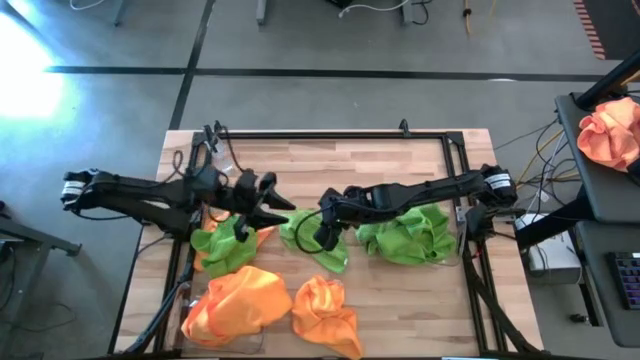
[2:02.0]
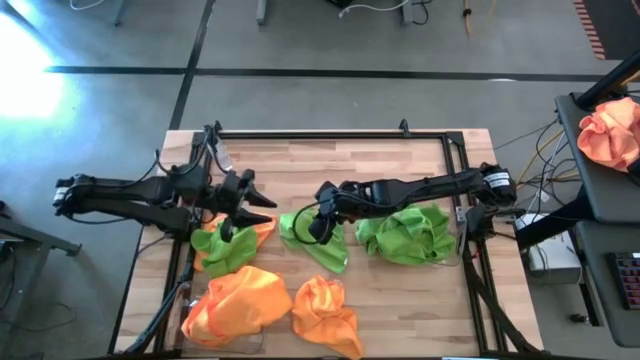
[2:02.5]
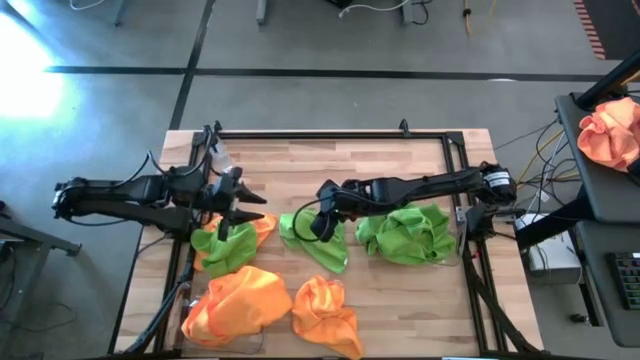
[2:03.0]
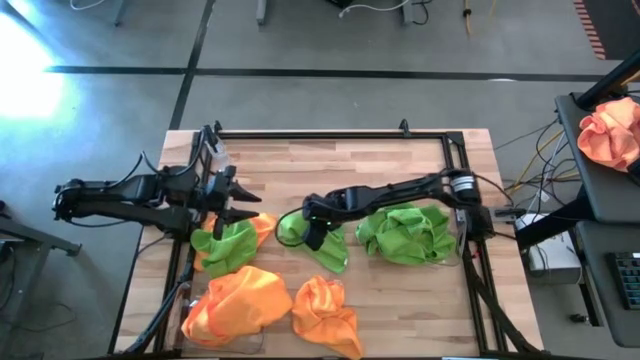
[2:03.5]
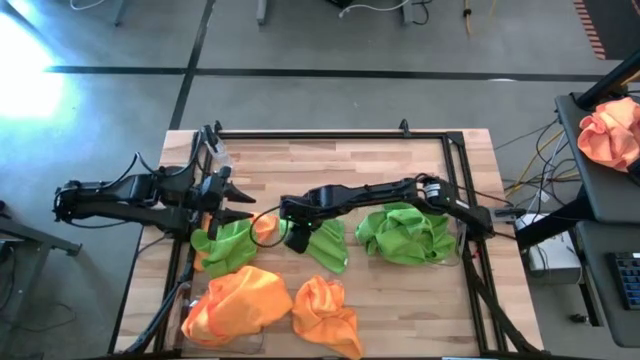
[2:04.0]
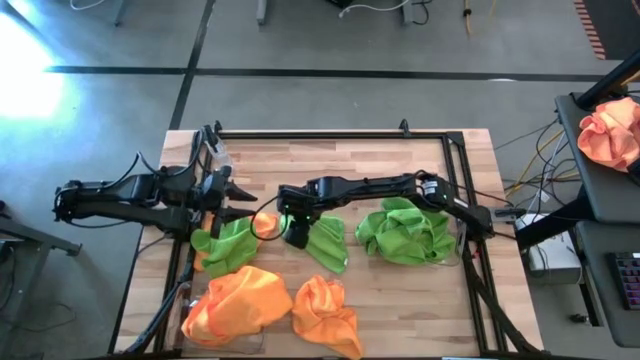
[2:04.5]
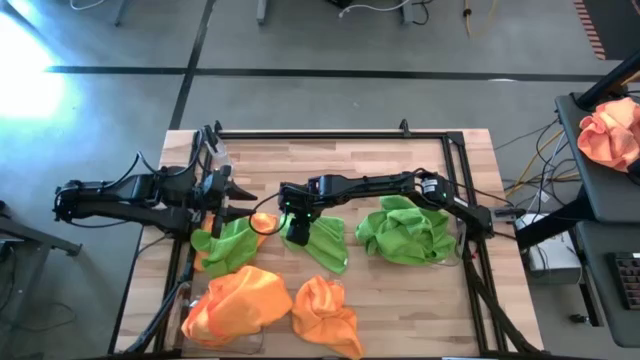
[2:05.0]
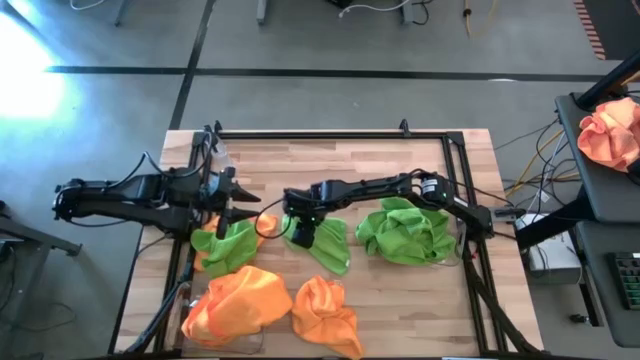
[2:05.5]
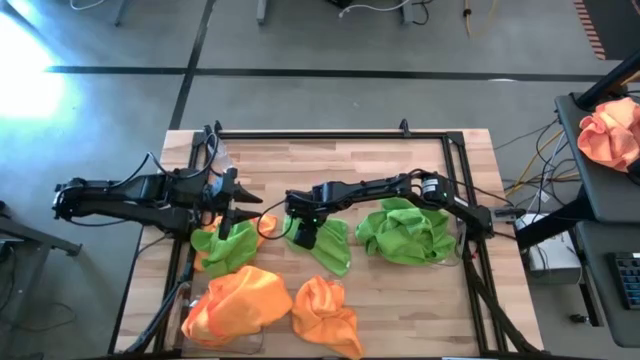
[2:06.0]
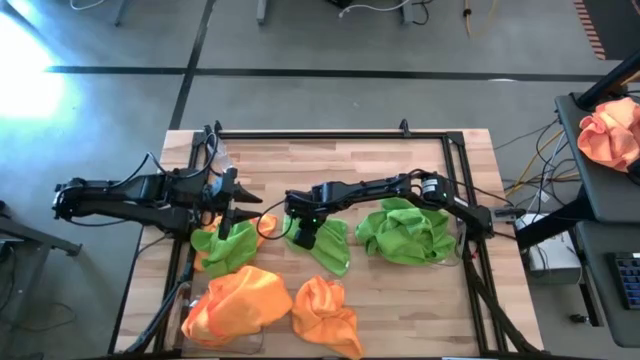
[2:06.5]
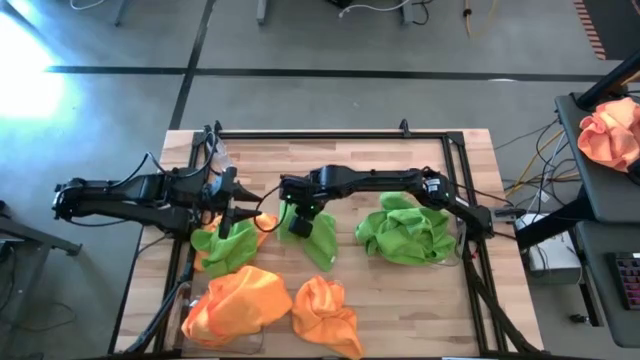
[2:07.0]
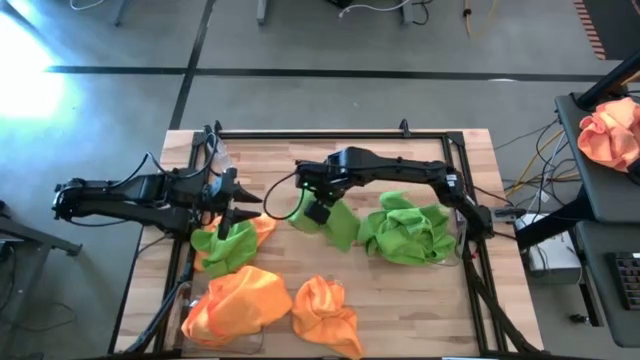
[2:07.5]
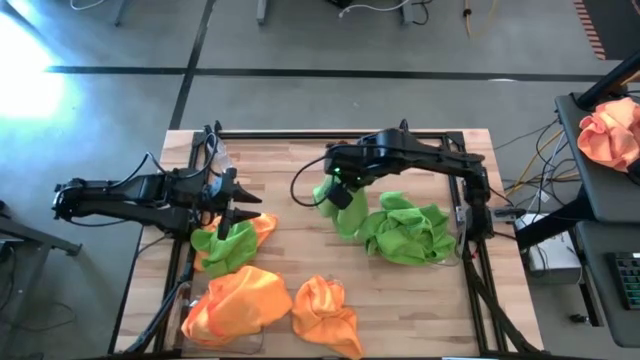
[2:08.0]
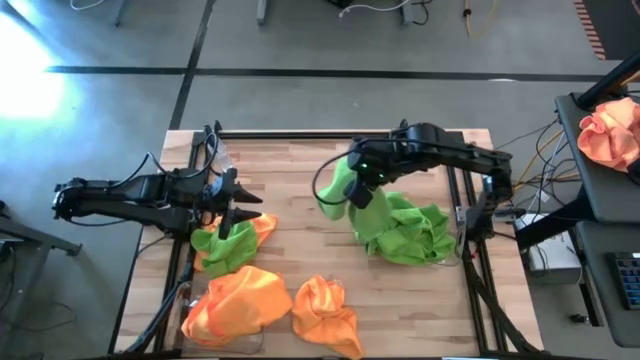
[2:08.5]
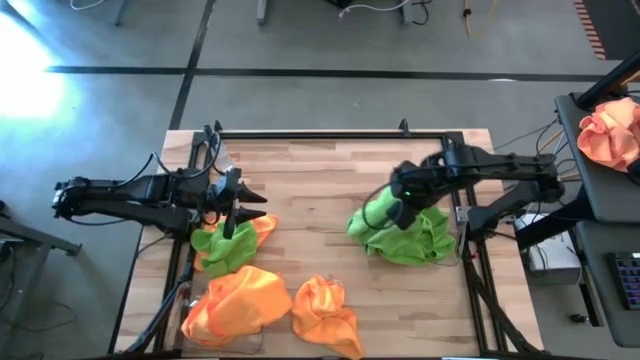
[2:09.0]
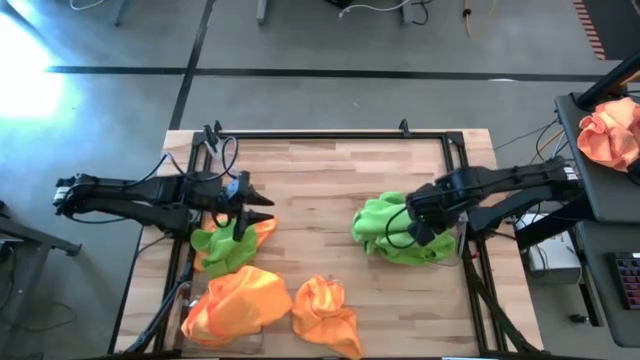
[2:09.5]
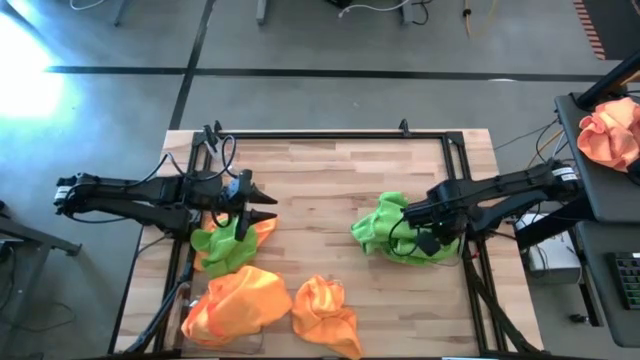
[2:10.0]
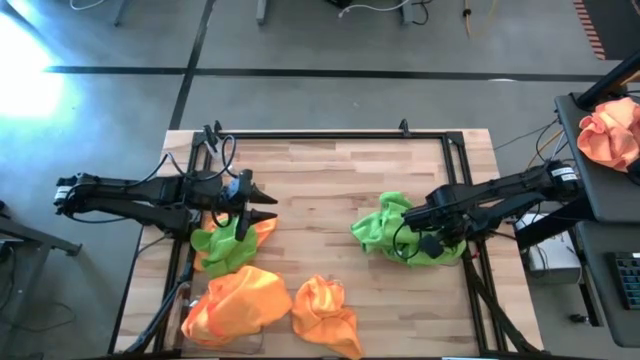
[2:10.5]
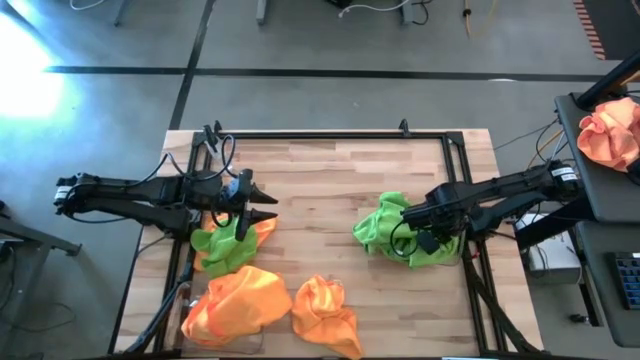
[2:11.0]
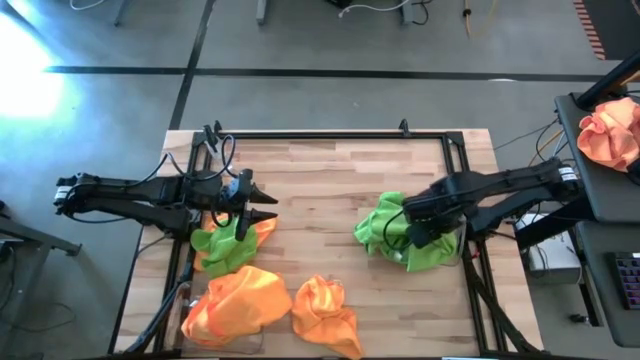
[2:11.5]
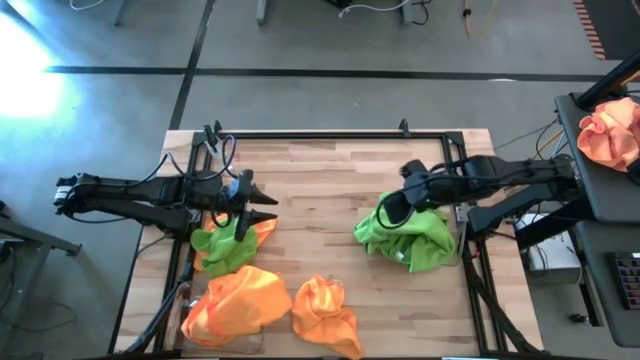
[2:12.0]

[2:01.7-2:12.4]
Task: Sort microfiber towel by color & place in baskets
Put the right green towel into the right transparent bin

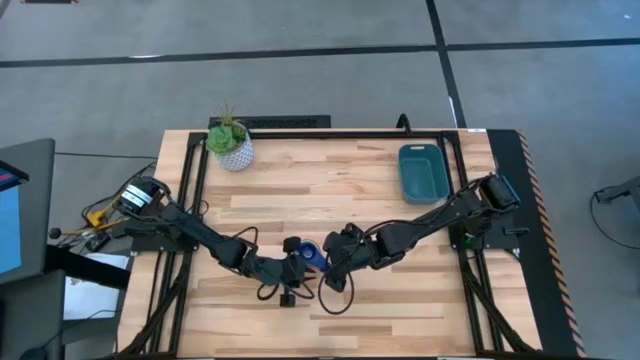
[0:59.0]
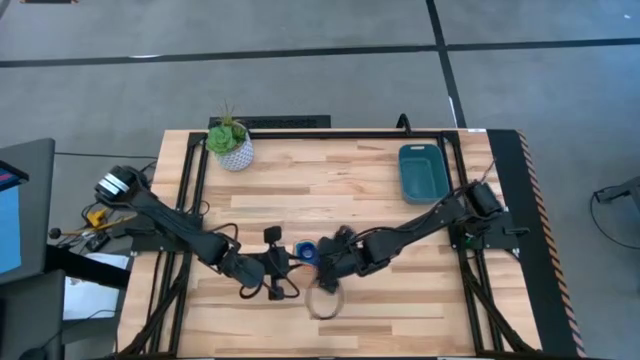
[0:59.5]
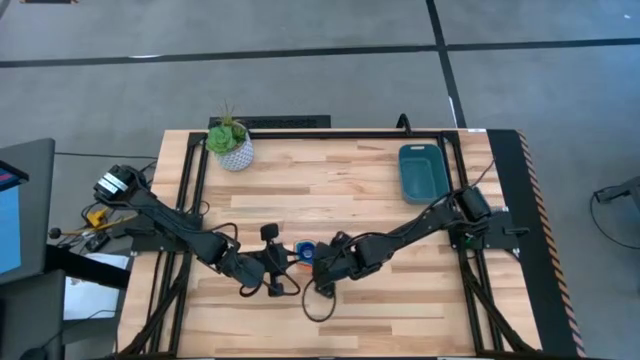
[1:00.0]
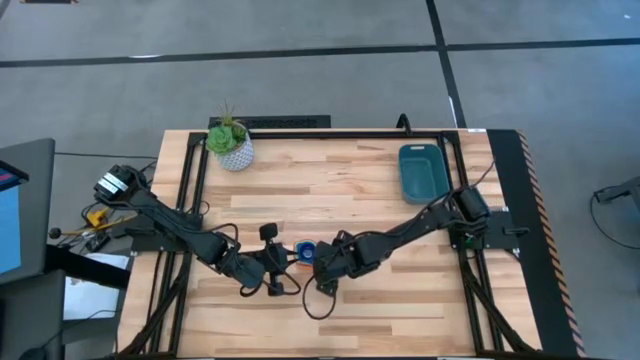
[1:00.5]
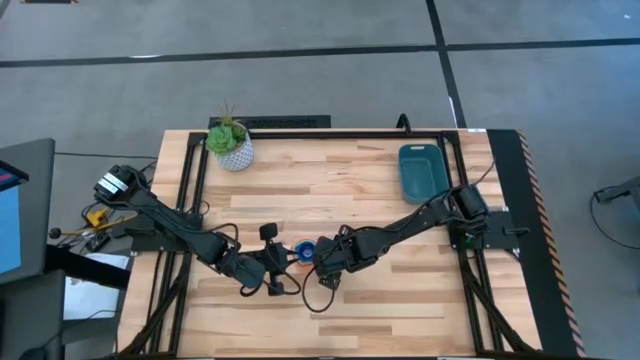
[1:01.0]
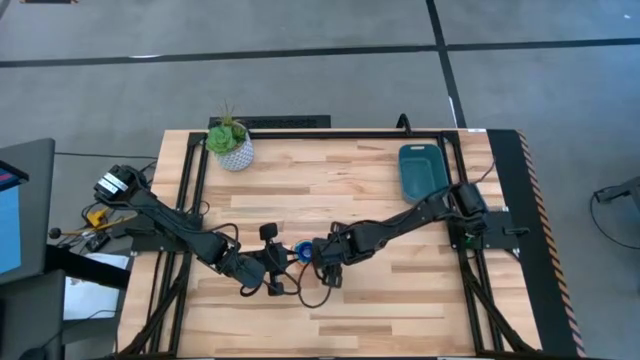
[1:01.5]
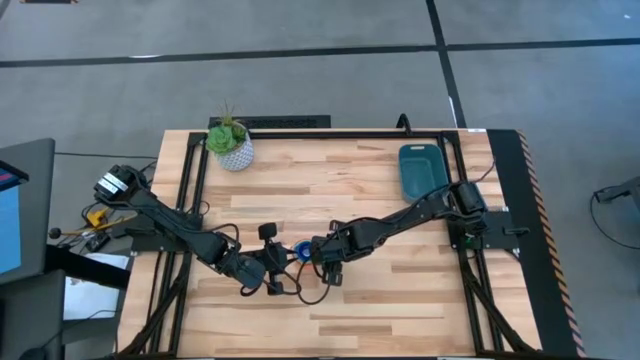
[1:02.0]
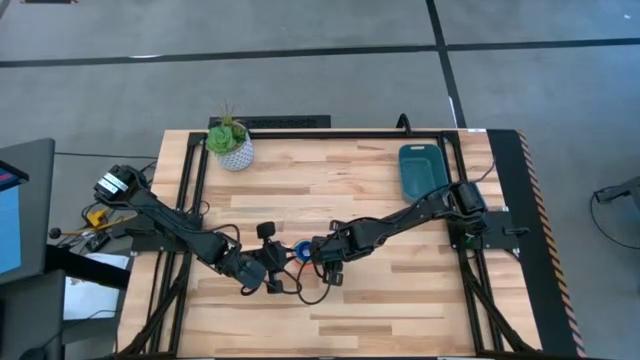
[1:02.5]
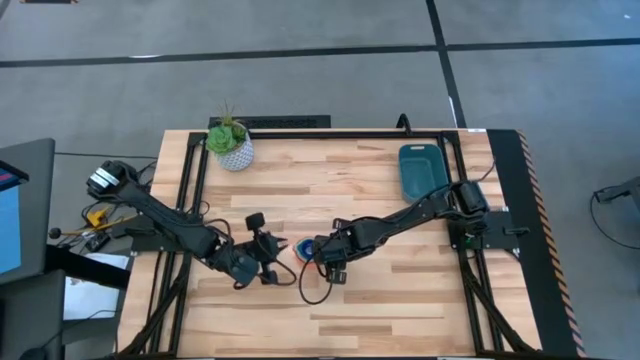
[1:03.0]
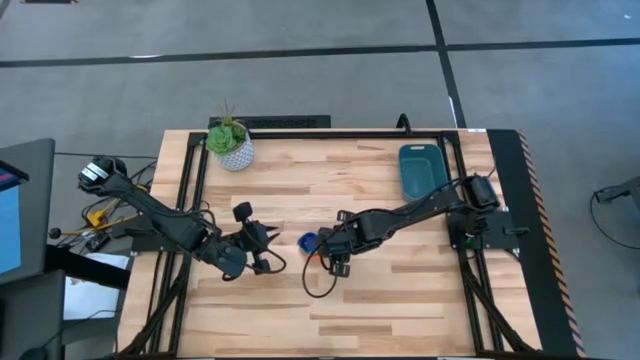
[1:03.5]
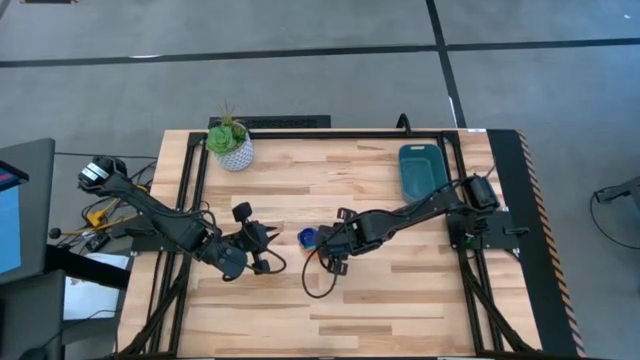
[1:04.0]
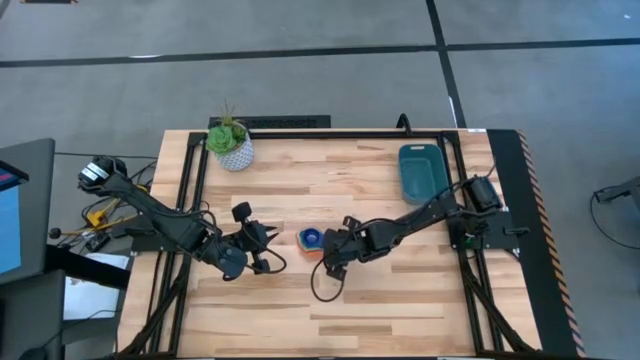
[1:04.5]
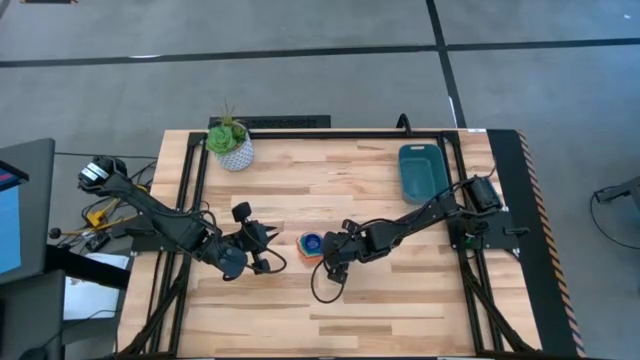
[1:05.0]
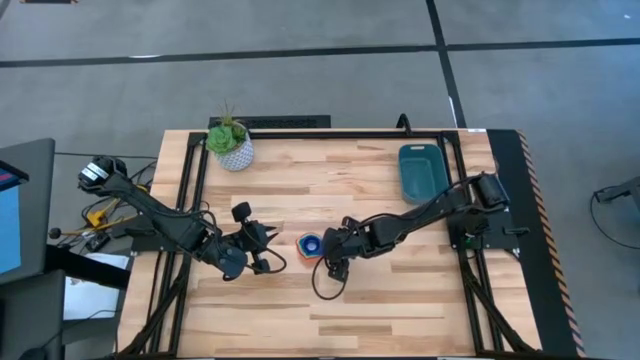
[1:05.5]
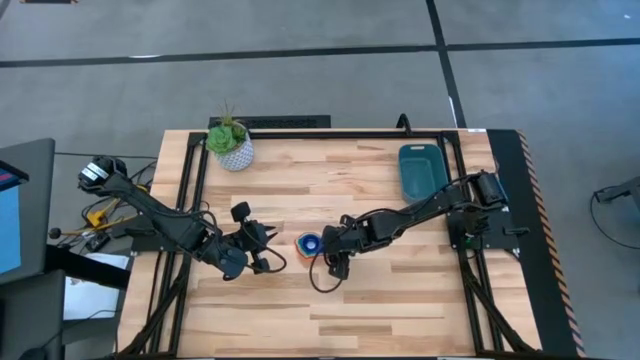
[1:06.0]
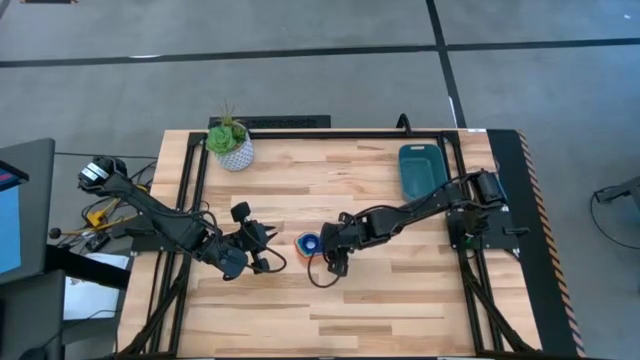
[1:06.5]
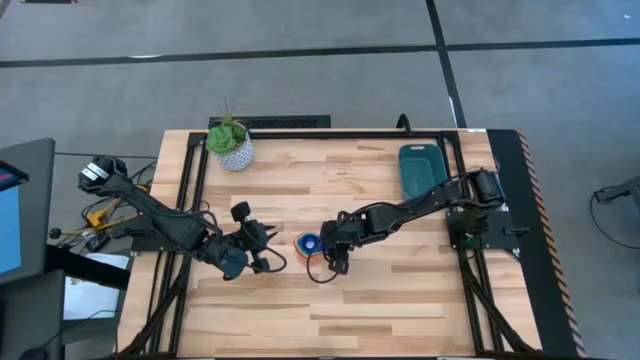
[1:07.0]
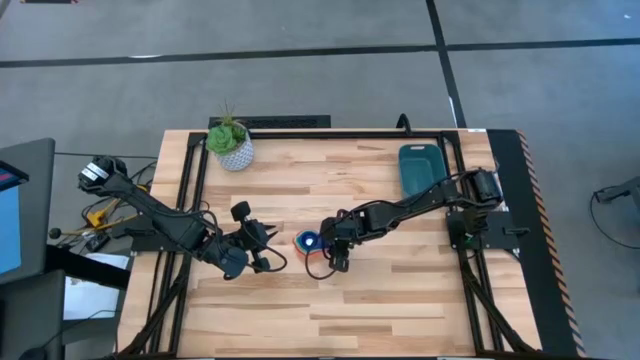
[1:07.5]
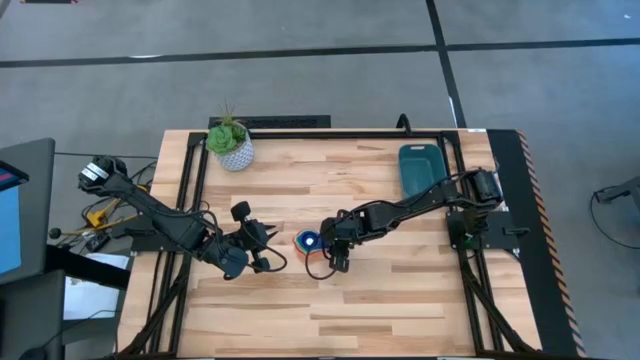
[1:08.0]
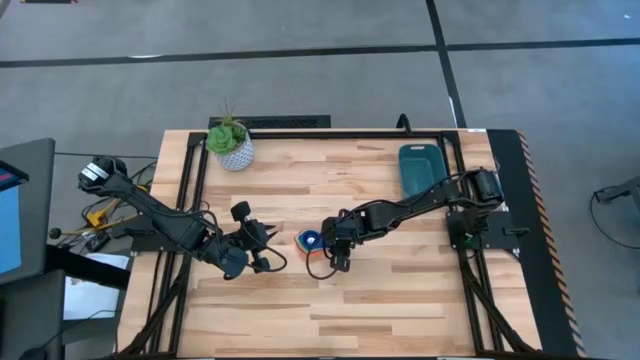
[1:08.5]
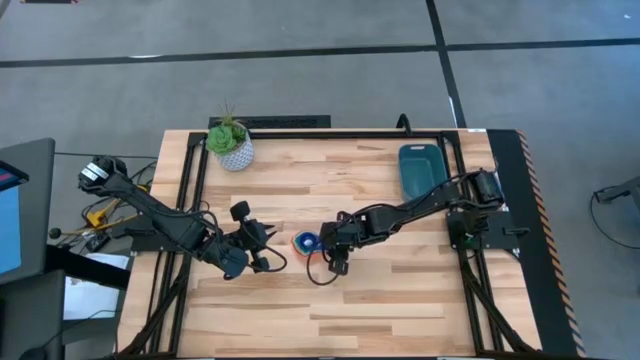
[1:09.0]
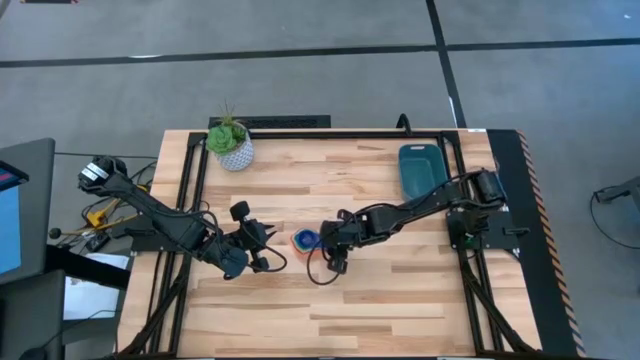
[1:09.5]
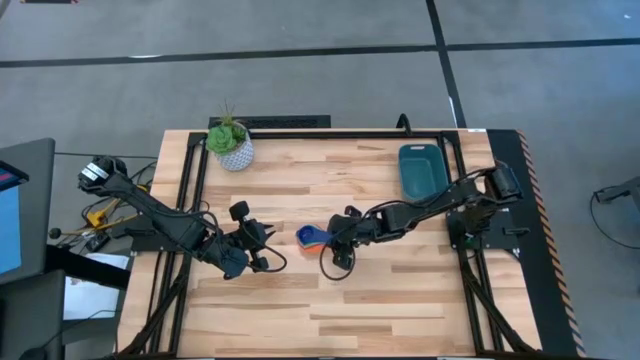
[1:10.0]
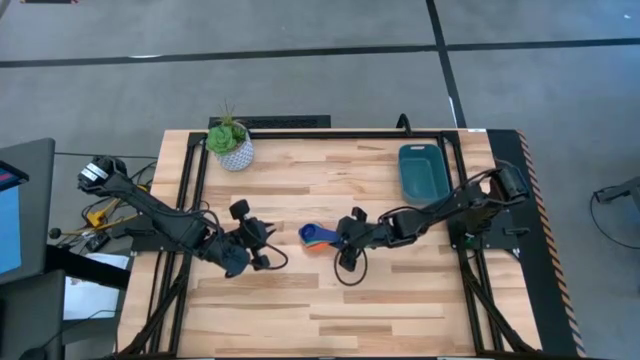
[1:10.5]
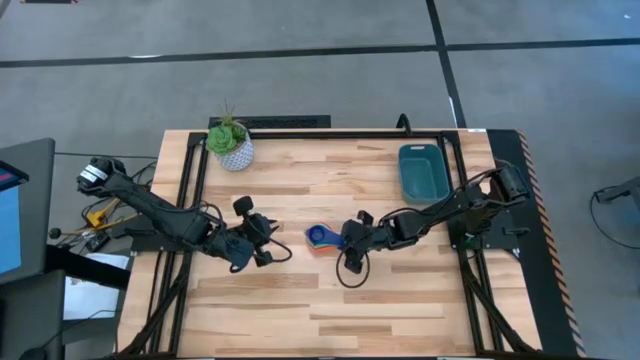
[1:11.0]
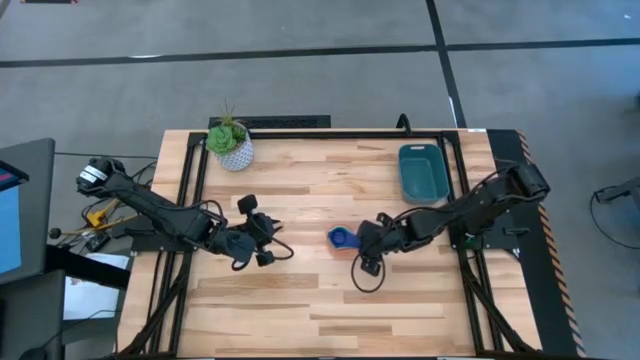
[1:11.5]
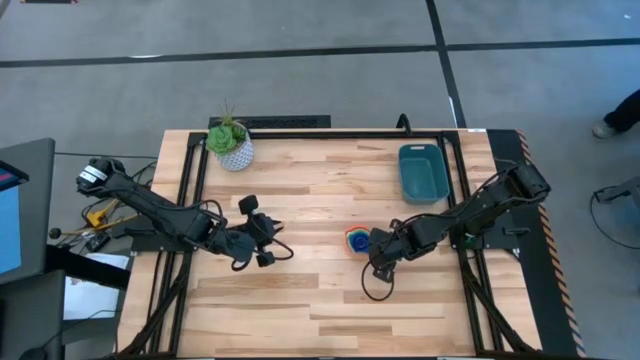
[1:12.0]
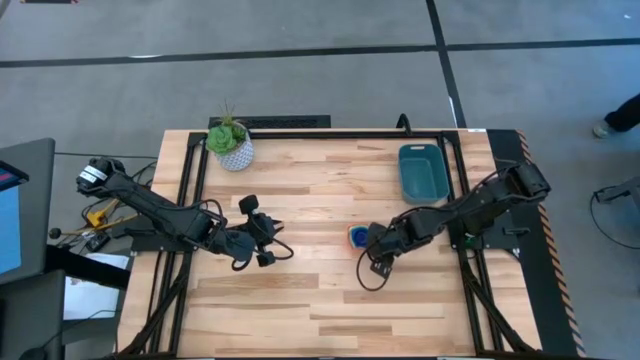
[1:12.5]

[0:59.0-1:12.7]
Task: Nest measuring cups in basket
Put the nested measuring cups into the blue bin
